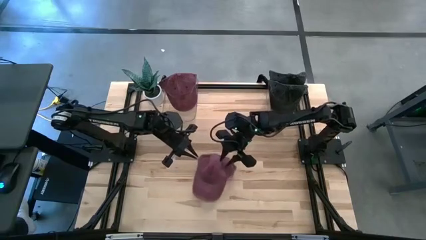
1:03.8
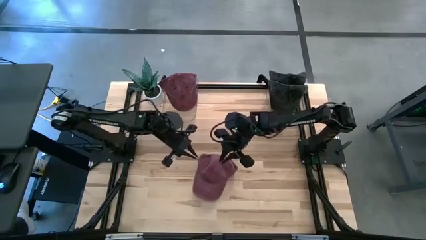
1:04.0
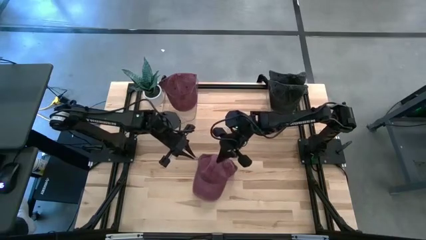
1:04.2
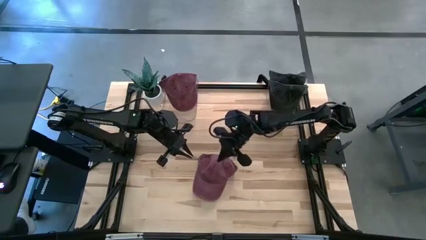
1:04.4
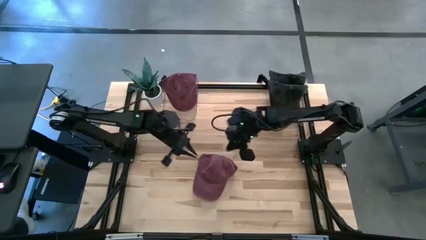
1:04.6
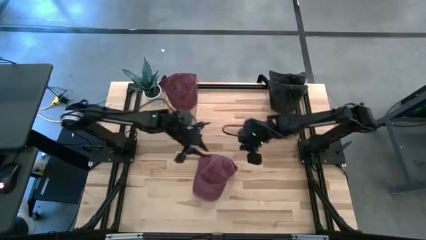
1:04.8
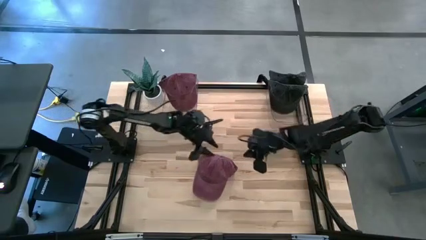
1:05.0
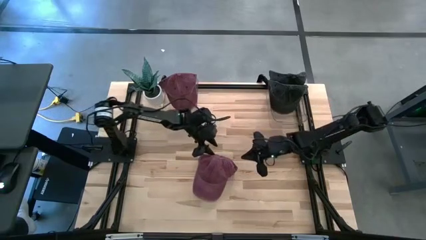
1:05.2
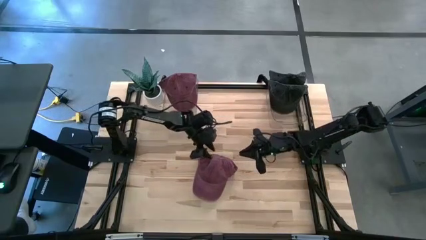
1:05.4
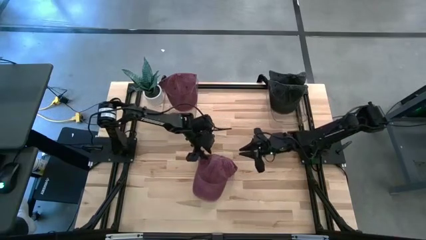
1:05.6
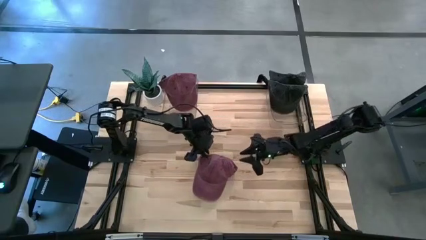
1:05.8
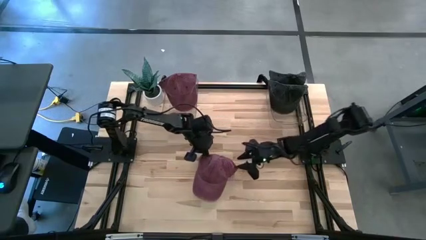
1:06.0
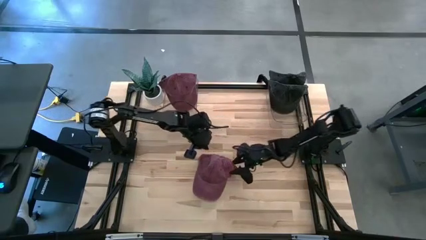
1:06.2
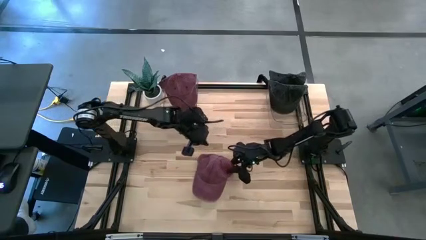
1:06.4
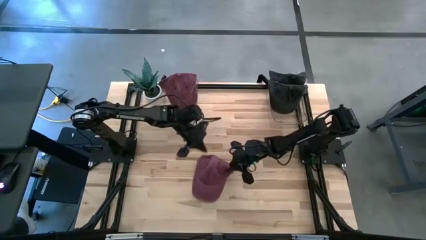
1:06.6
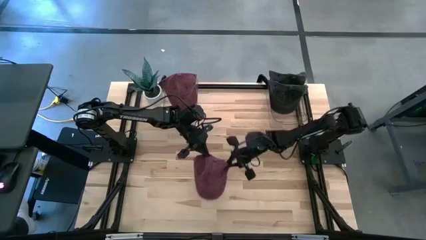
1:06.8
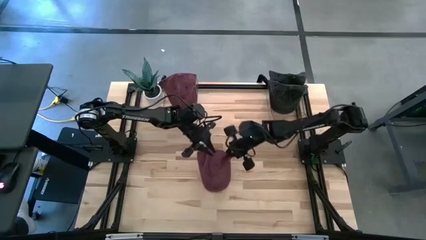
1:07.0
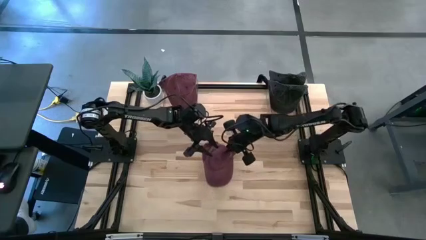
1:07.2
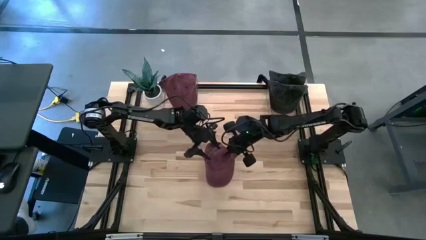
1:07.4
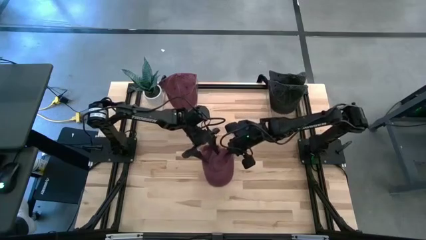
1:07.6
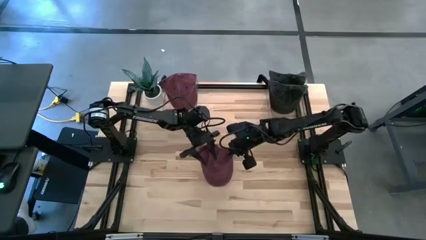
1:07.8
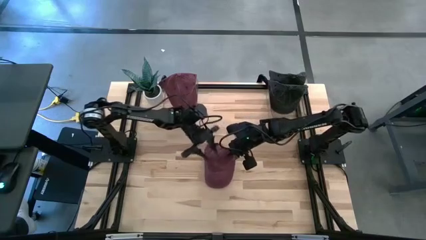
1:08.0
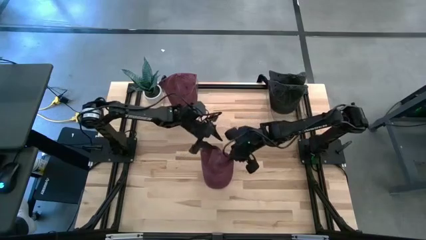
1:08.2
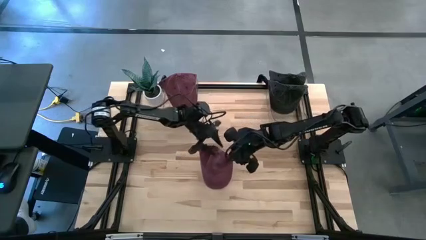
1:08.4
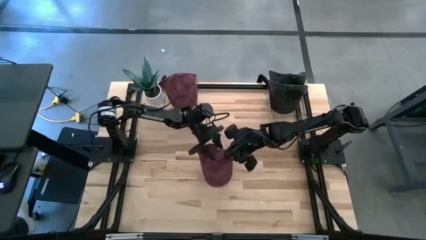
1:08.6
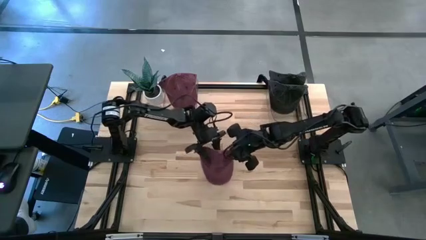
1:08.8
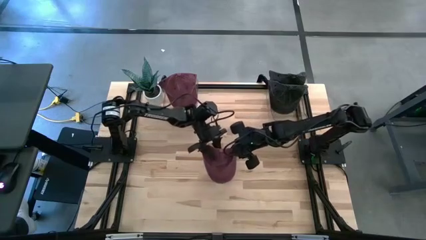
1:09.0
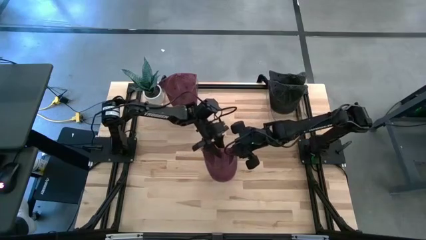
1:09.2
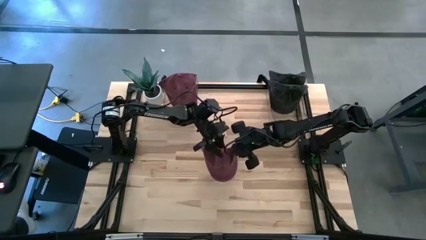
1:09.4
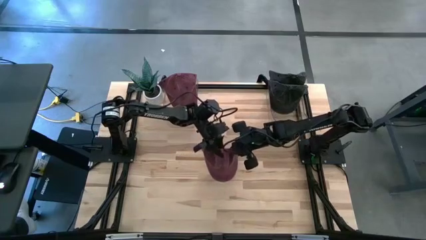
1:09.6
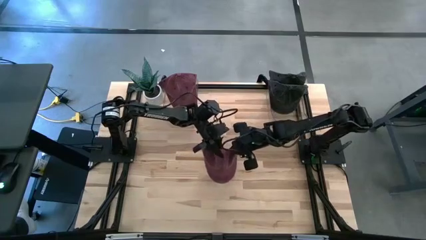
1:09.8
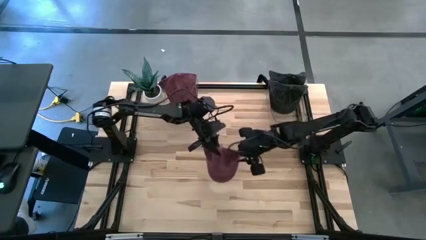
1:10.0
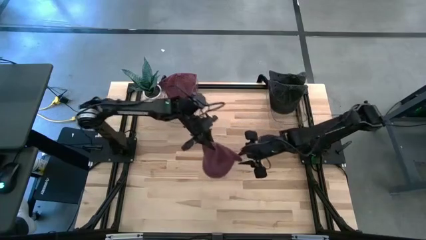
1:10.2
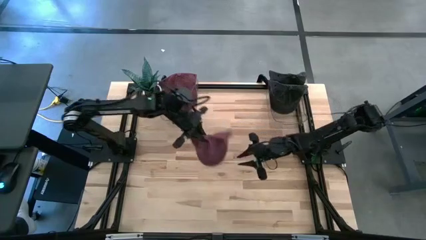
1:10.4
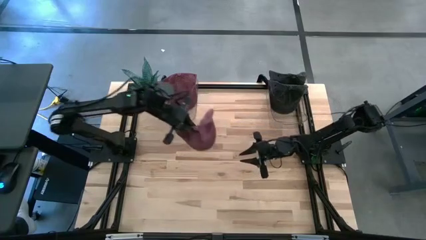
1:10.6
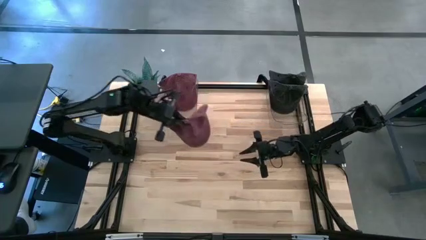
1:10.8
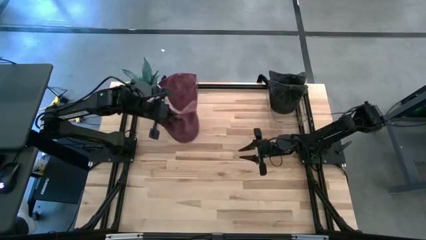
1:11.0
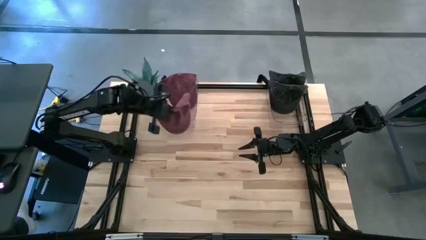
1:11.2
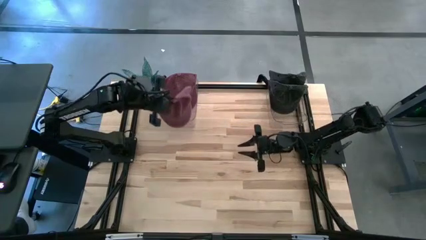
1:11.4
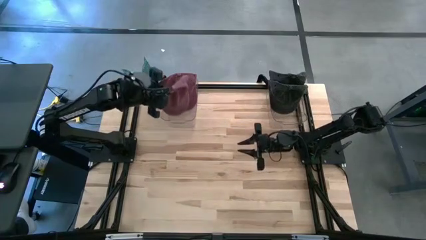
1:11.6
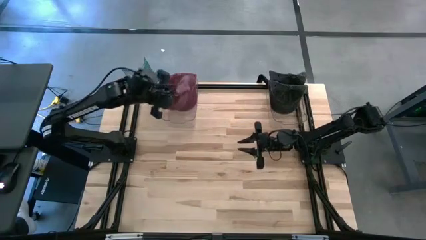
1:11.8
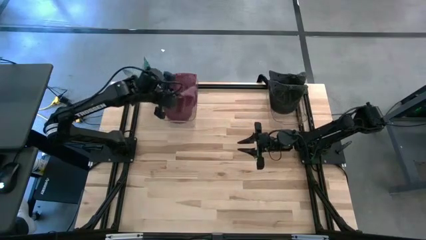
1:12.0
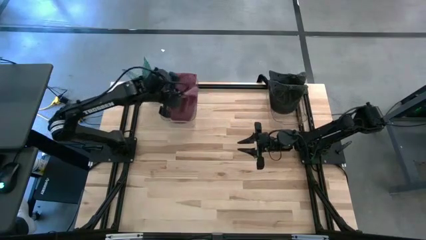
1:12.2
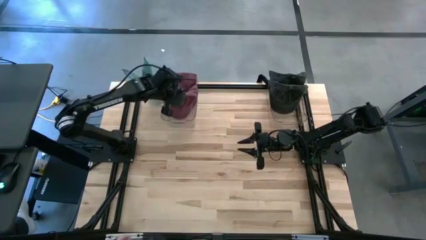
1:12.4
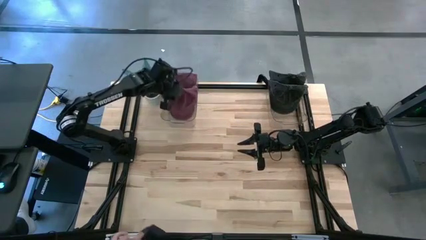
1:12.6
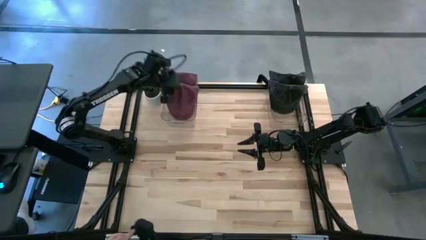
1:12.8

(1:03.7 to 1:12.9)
Task: Pick & Place hat
Put the red cap into the left transparent bin

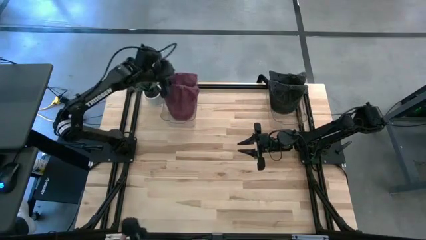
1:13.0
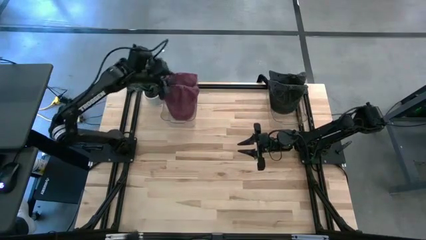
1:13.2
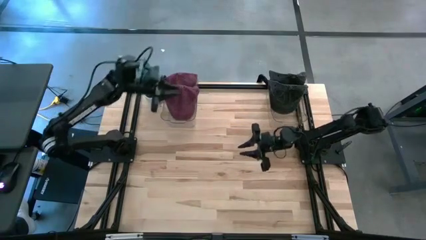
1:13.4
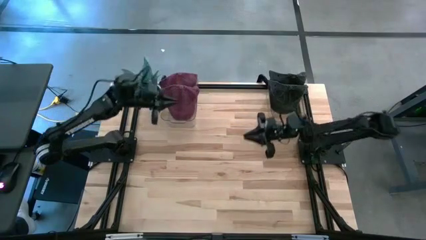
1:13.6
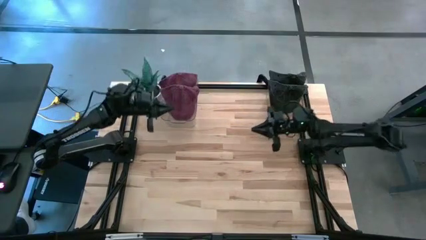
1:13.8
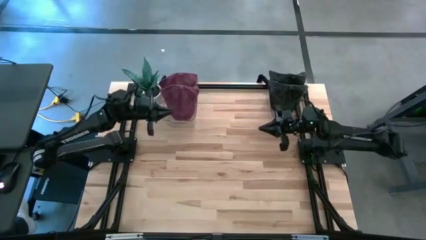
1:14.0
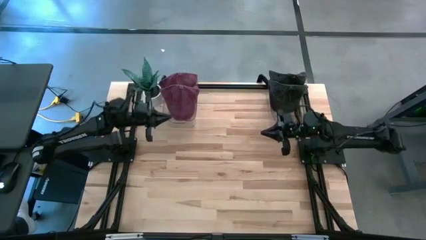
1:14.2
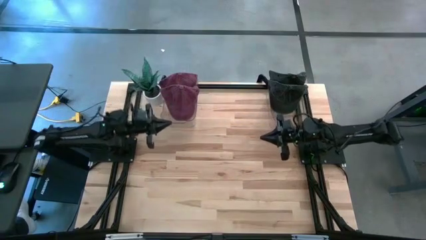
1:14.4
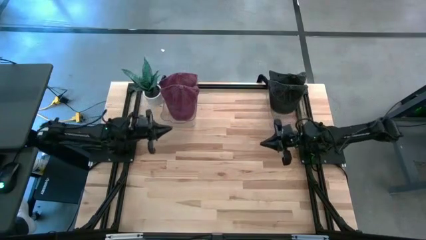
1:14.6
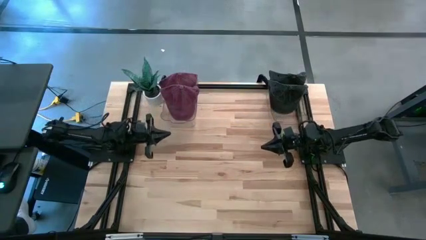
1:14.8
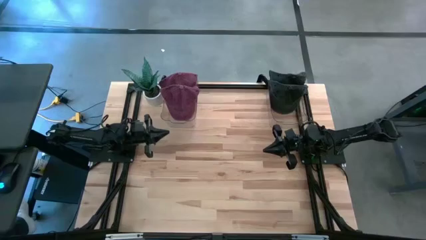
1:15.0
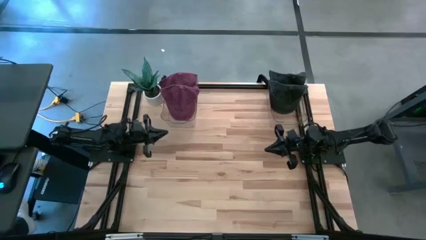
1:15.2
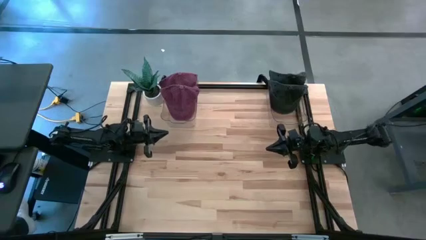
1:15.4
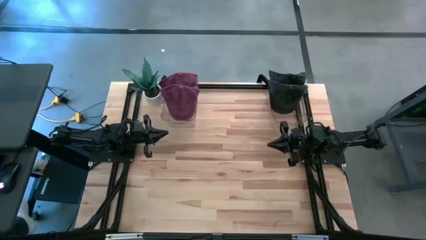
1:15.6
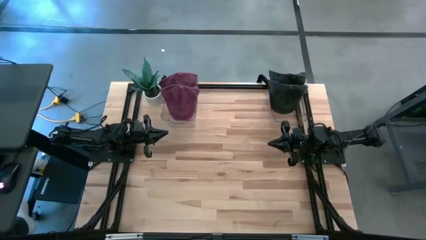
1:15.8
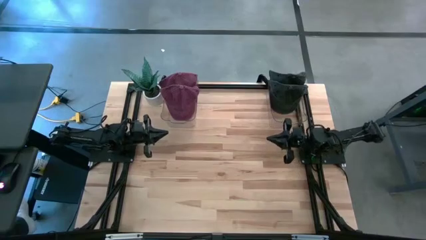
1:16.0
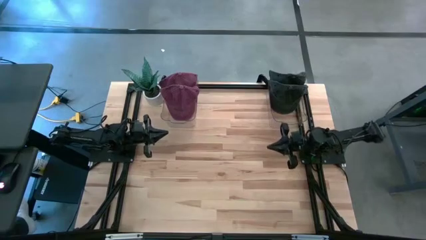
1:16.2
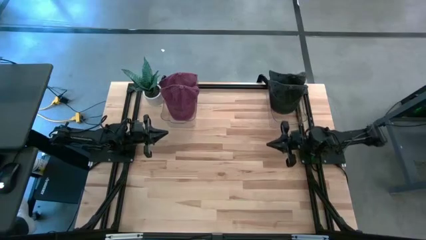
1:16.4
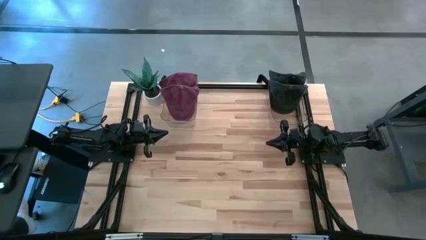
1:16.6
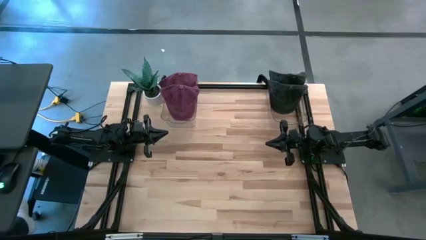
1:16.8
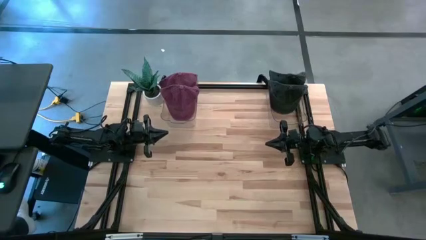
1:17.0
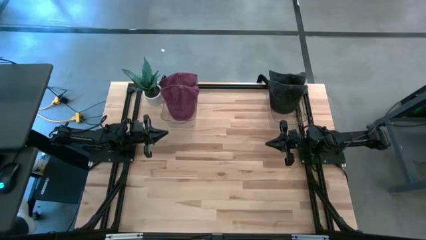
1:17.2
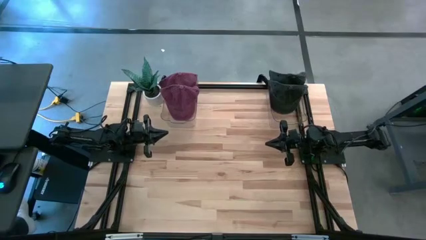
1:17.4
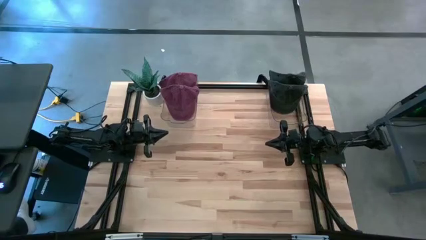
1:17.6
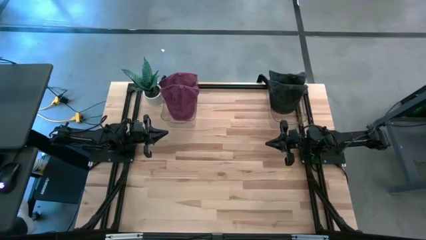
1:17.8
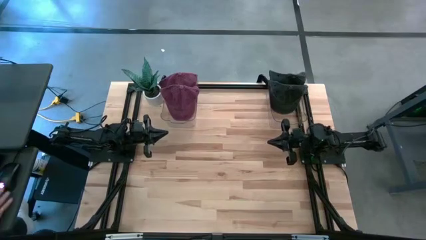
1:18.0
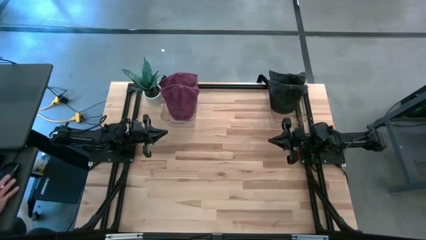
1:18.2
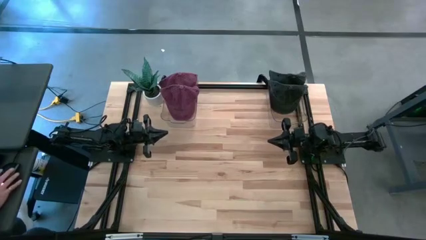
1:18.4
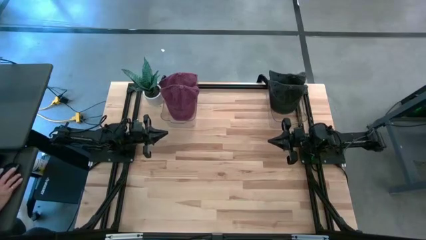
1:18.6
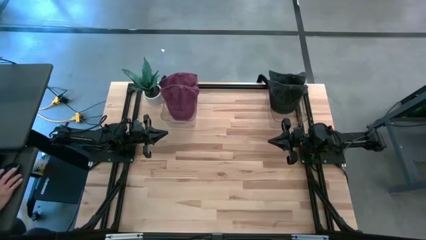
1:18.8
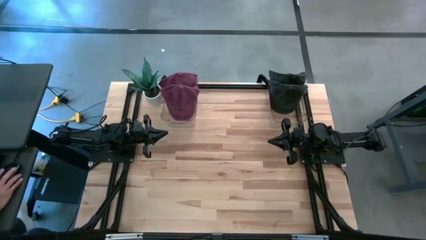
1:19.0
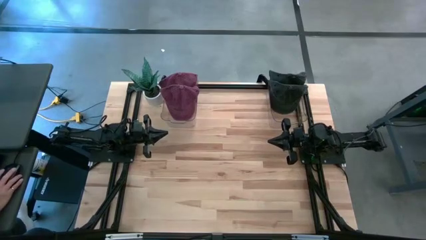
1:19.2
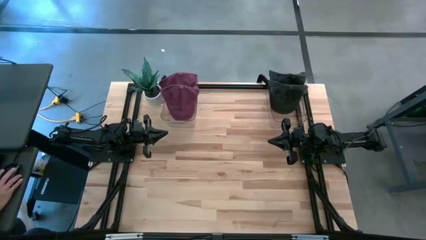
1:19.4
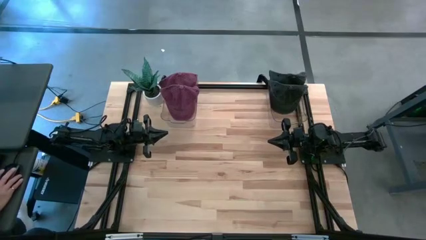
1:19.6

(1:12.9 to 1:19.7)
Return to Home Position
